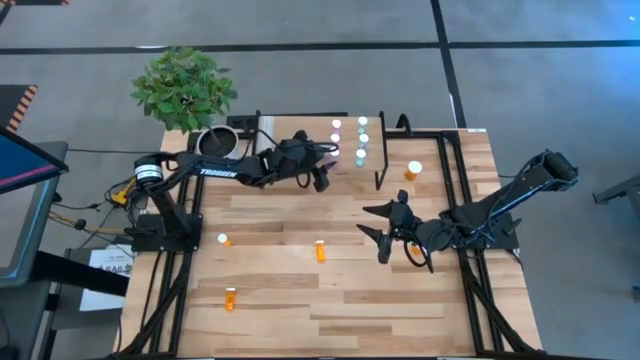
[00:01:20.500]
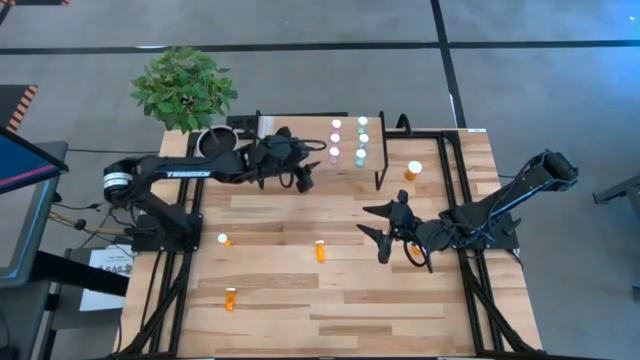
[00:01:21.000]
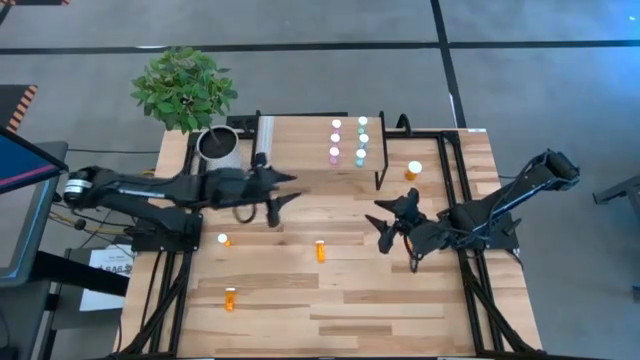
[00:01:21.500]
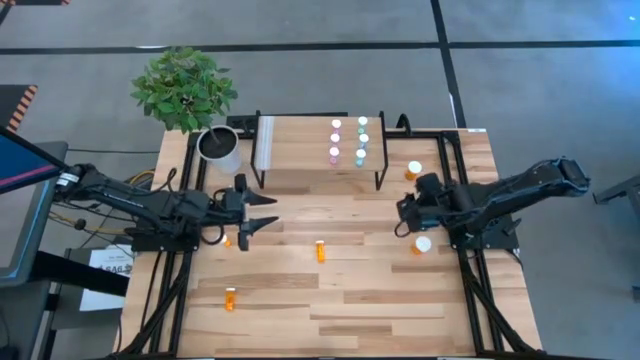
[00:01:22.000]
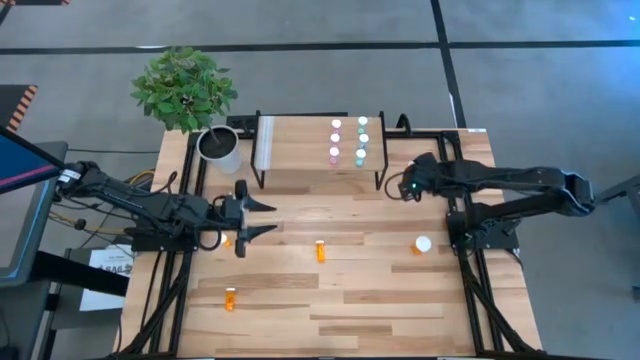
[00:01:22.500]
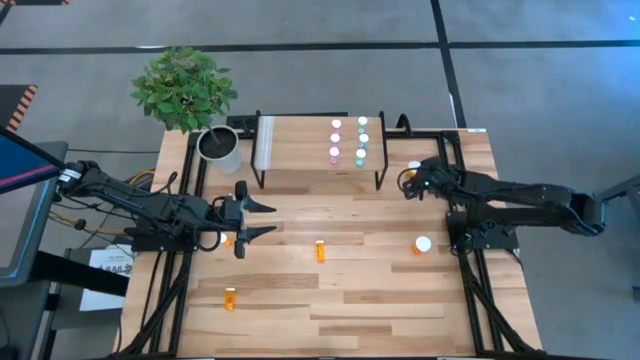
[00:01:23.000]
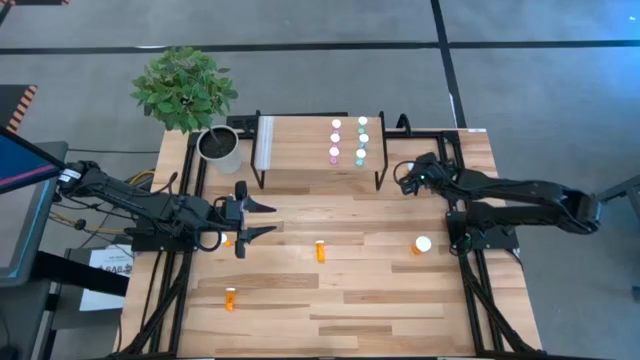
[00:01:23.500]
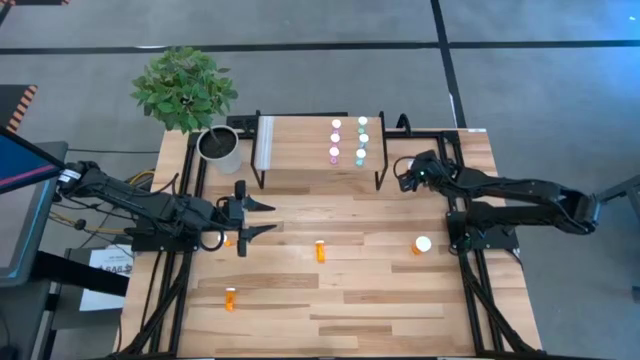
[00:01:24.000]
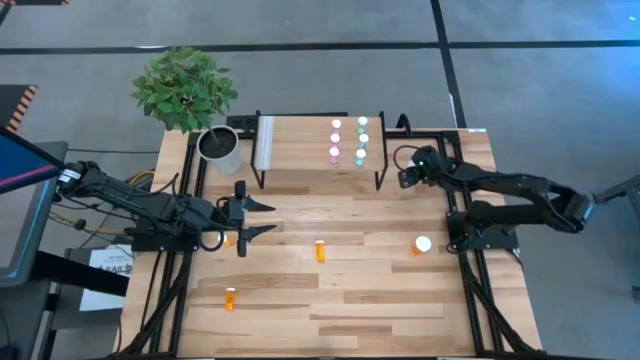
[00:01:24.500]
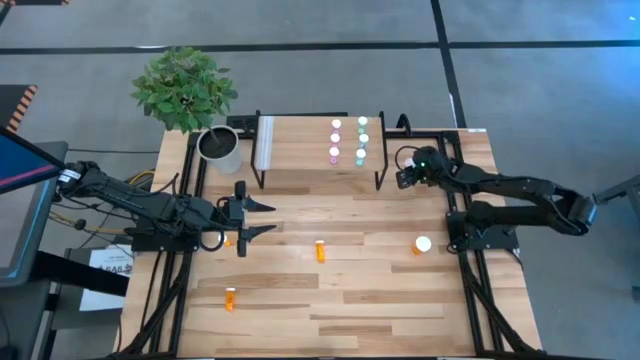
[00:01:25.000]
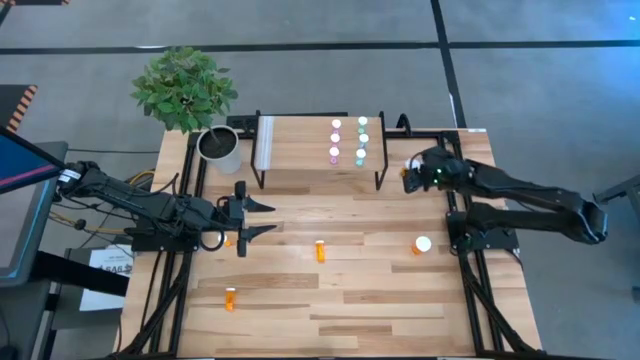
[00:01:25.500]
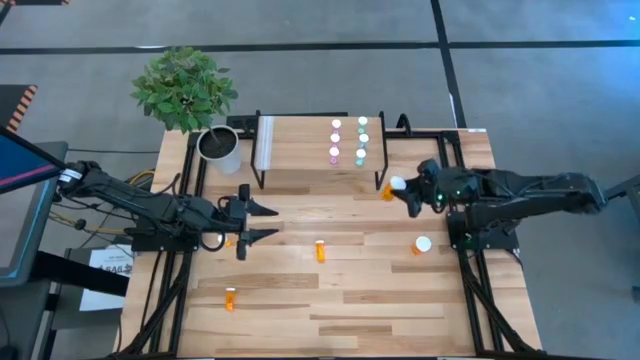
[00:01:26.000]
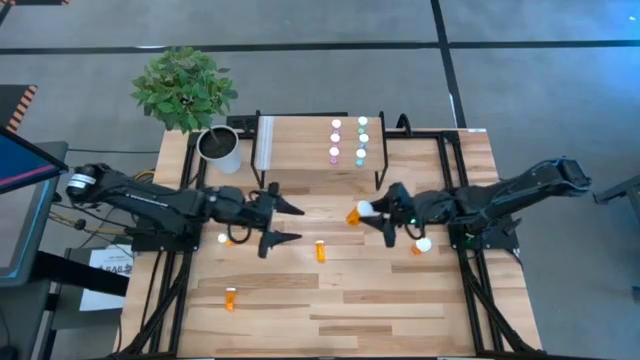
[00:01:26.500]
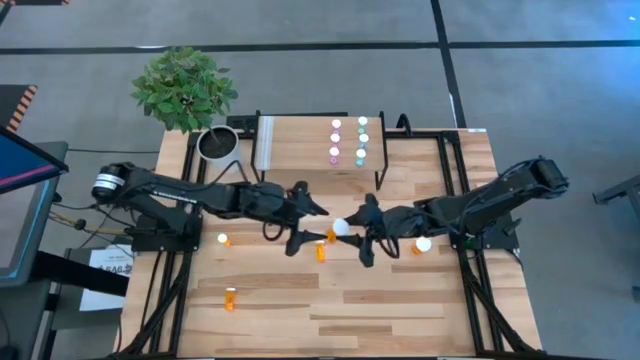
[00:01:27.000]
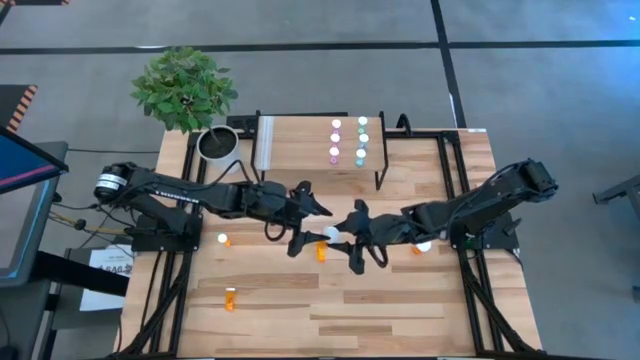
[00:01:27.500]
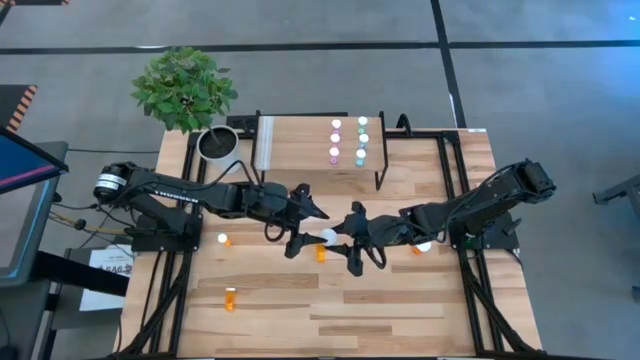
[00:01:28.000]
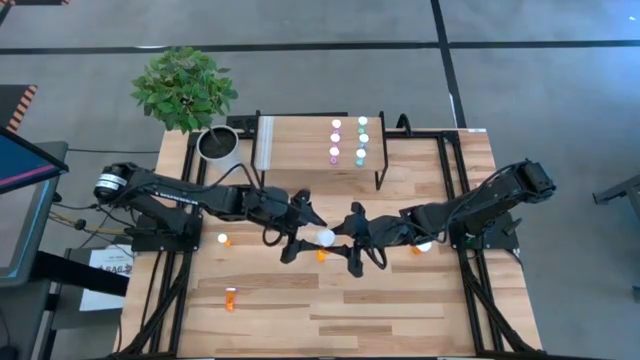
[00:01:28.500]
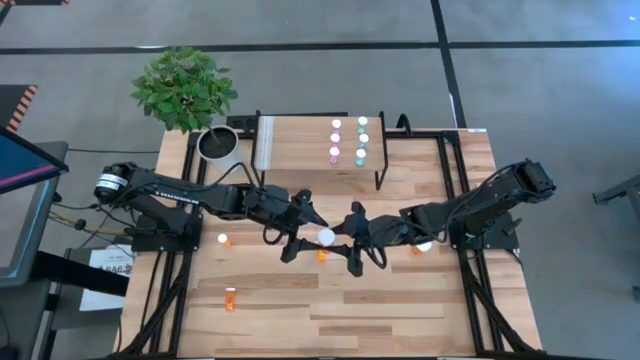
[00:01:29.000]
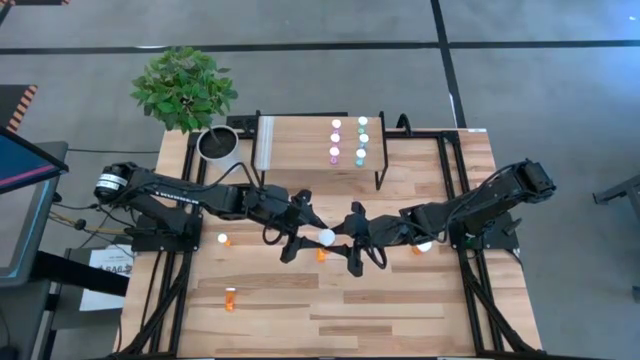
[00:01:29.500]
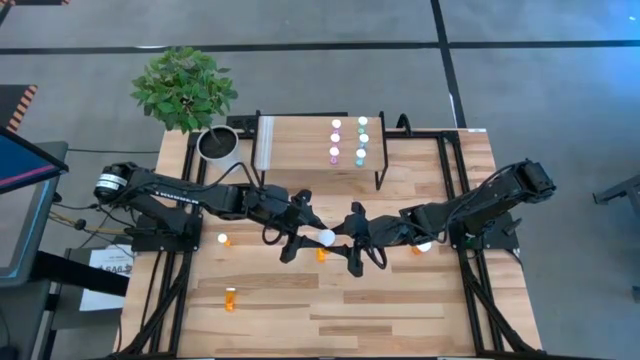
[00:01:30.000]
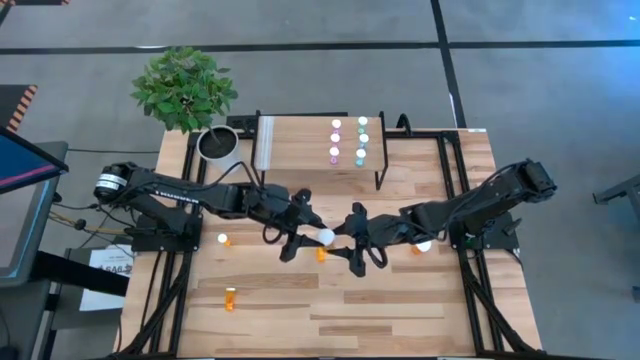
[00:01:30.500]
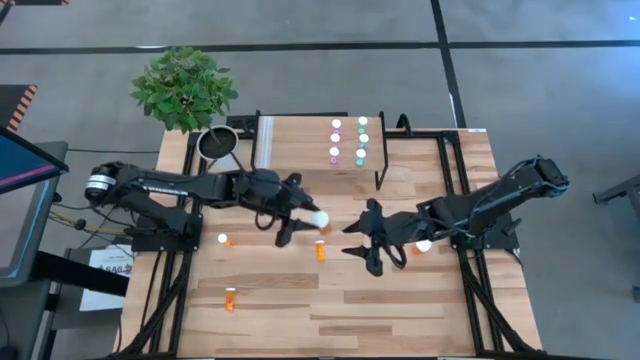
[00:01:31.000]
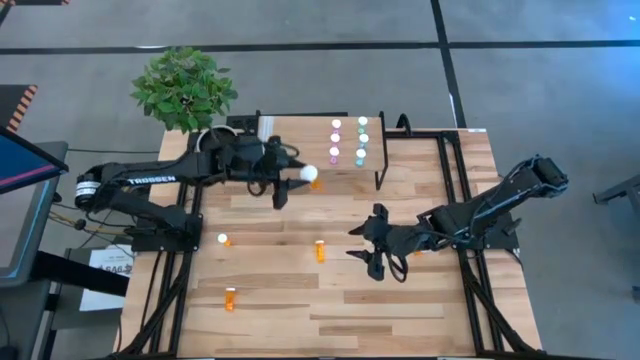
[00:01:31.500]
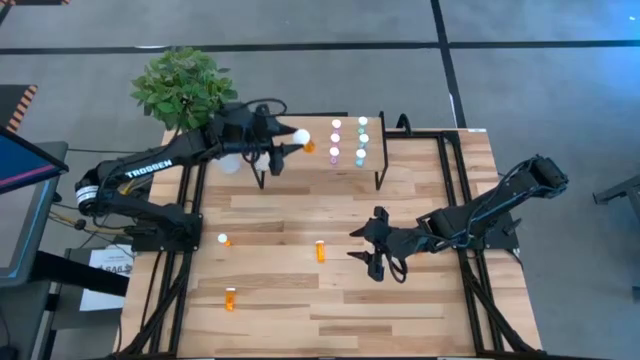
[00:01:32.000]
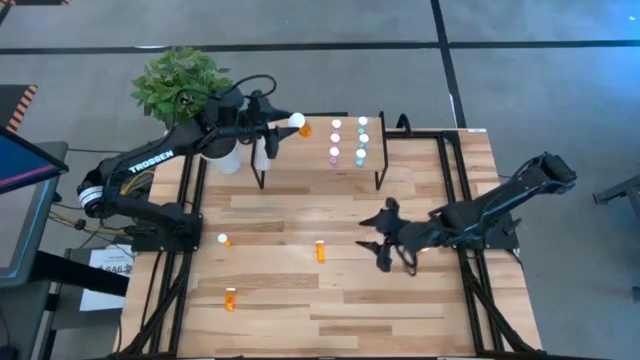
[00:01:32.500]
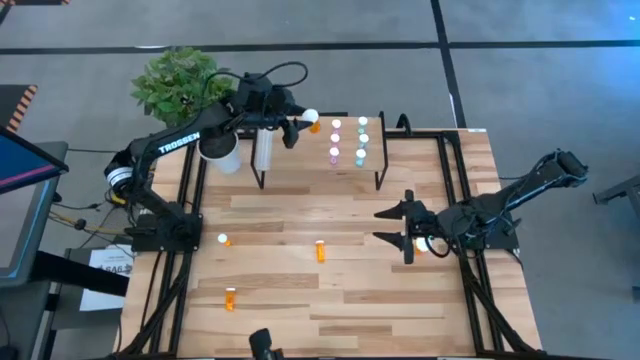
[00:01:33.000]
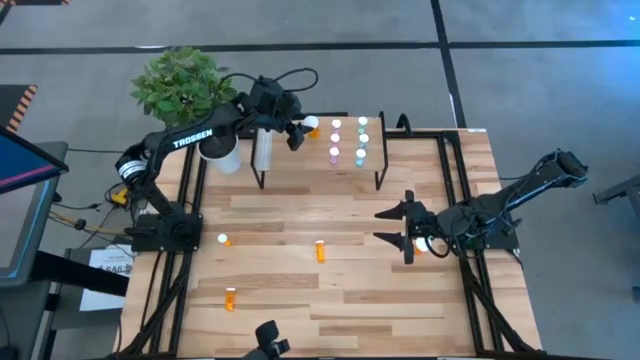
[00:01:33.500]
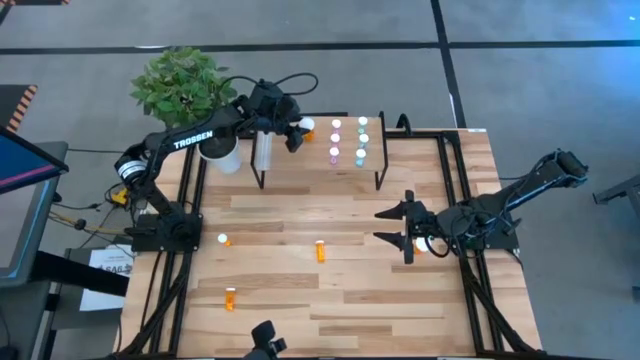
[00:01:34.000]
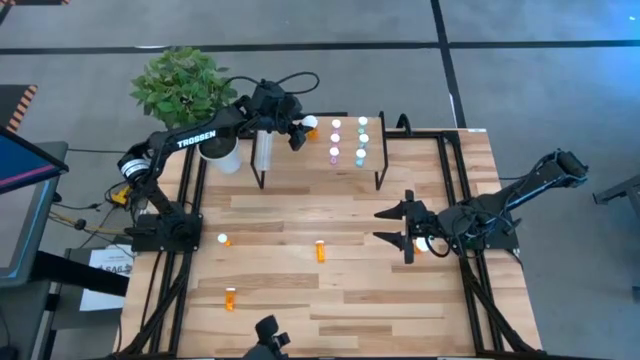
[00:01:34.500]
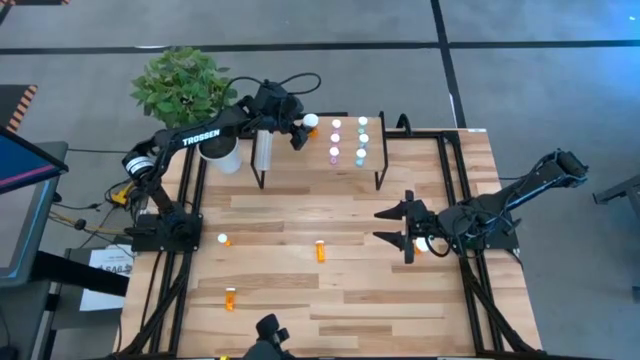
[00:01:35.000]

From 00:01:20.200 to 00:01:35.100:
Task: Pick and place medicine bottles onto shelf by color
Put the top large orange pill bottle on the shelf

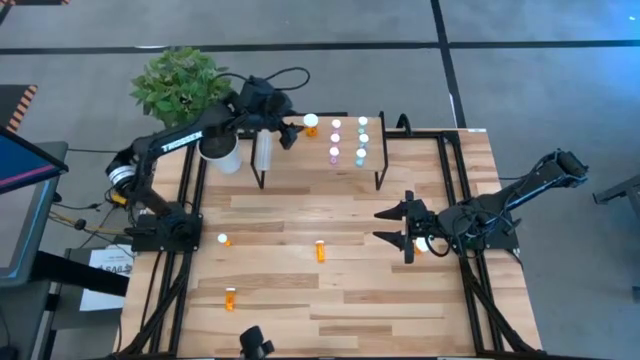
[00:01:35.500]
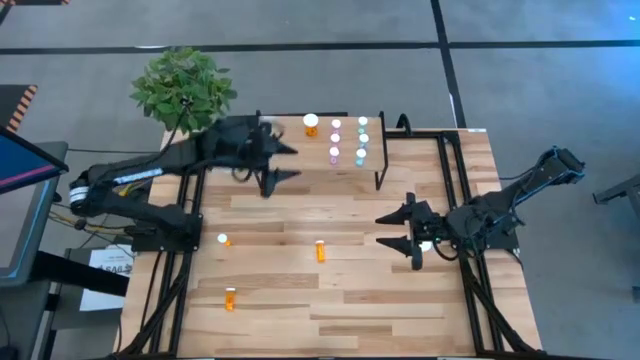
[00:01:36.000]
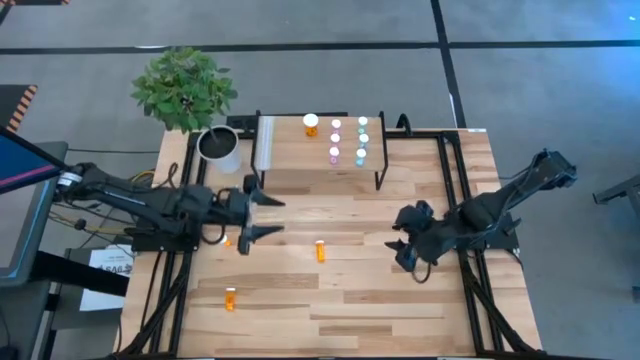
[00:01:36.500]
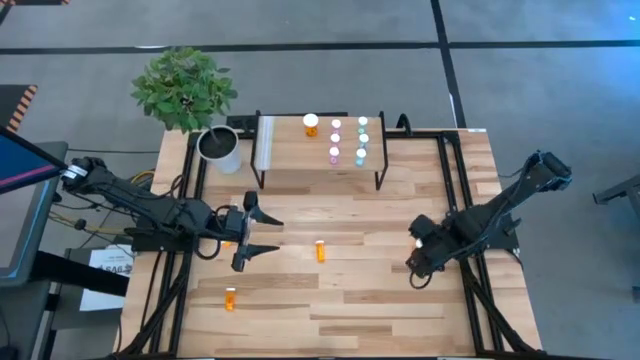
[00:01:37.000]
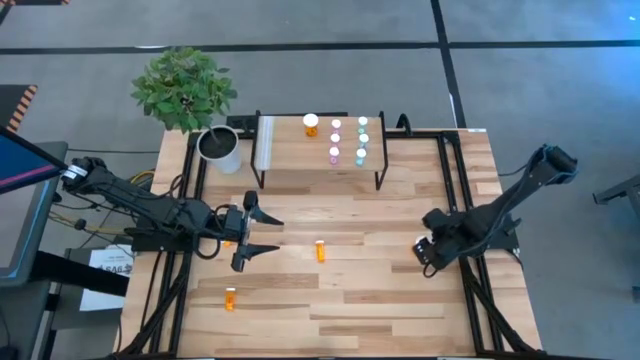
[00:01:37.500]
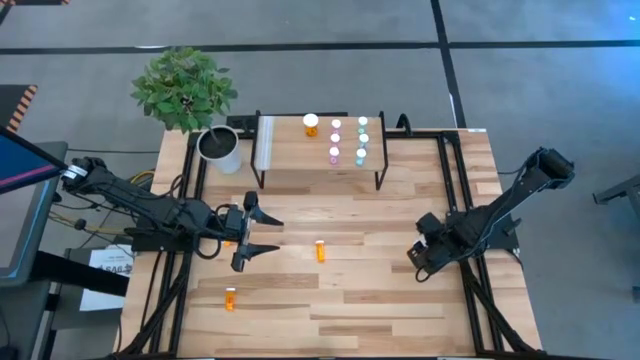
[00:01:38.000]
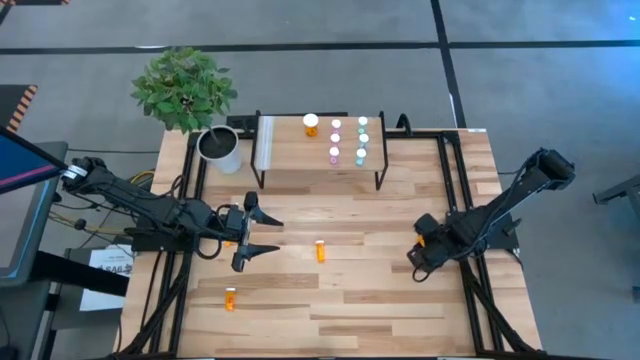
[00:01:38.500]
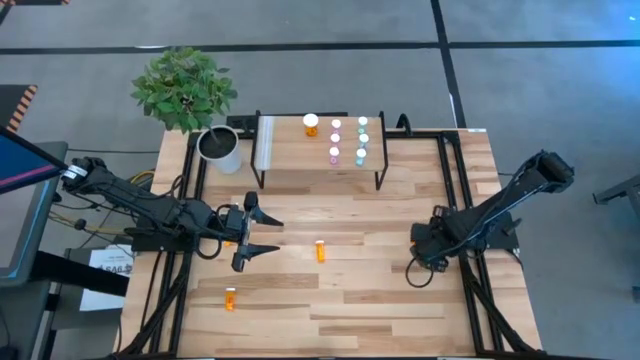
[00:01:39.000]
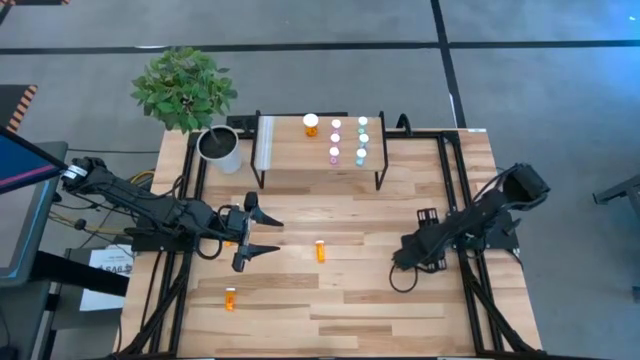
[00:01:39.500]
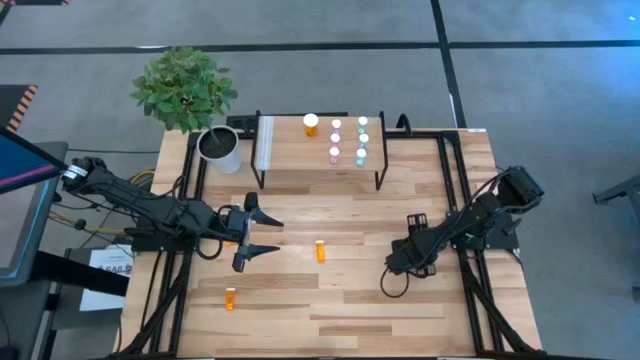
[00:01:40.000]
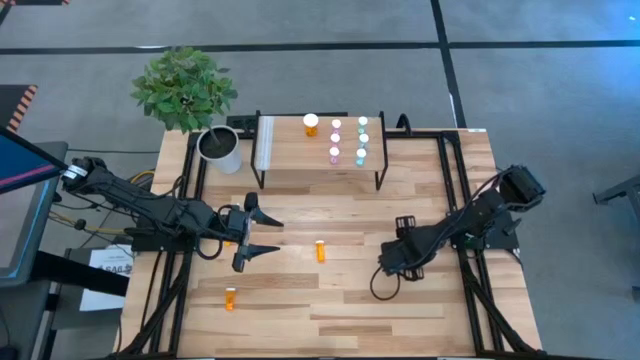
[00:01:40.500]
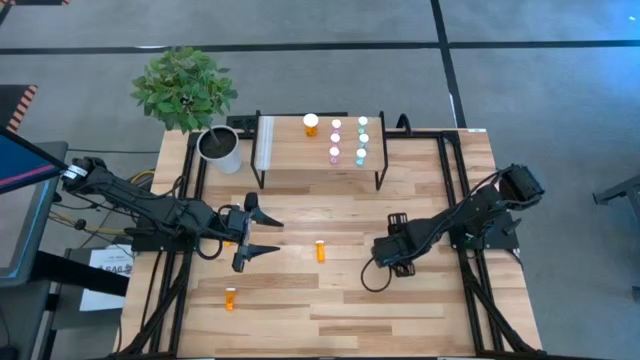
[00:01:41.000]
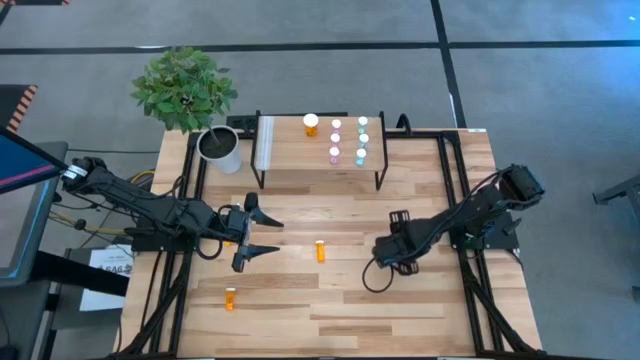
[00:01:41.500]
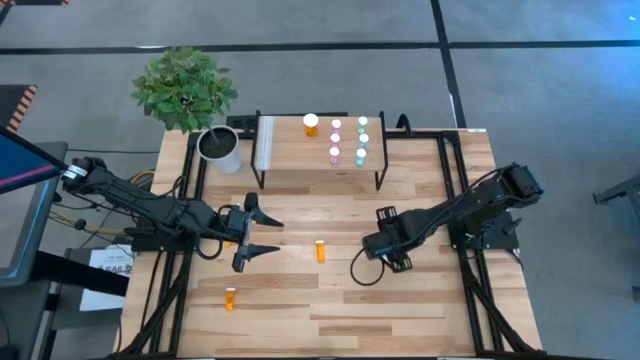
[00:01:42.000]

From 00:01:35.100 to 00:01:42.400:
Put the large orange pill bottle on the shelf aligned with the other large orange pill bottle

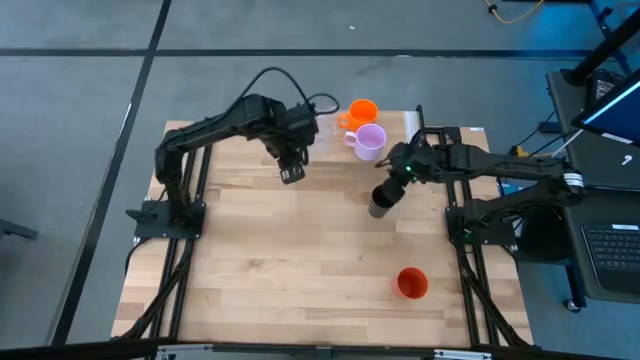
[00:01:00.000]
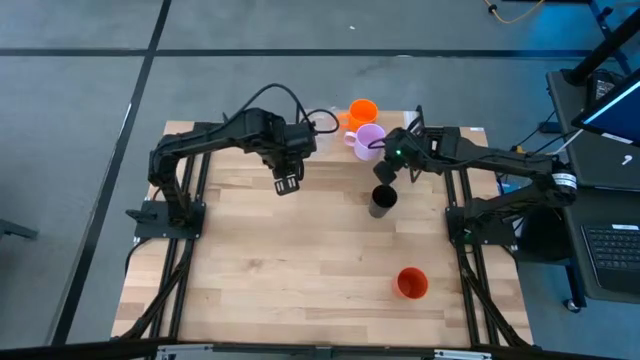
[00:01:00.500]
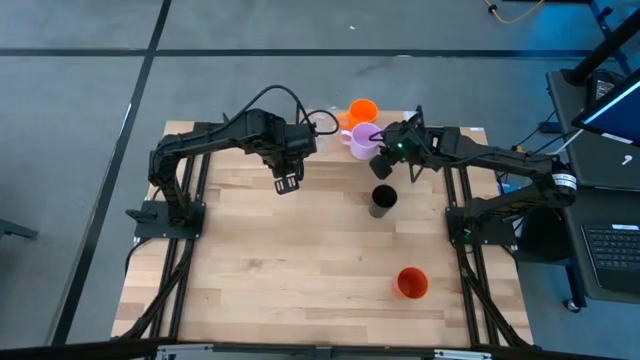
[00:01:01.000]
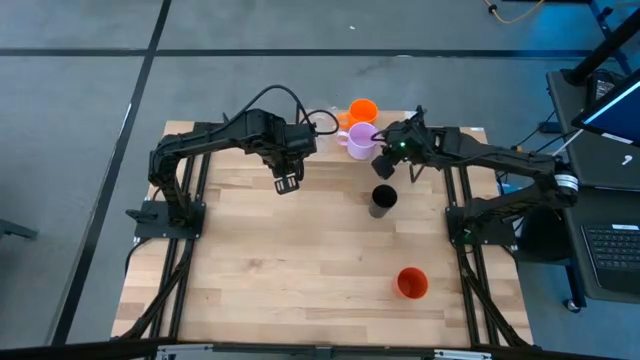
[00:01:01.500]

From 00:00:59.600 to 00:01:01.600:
Task: Stack small to large cups/mugs on shelf
Adjust the purple mug on the shelf
